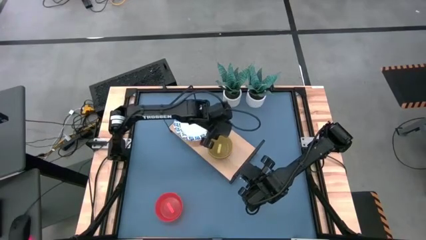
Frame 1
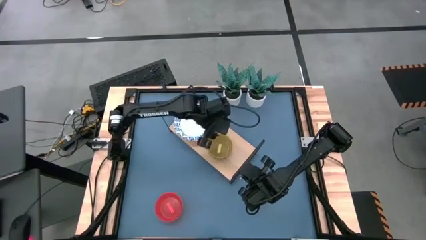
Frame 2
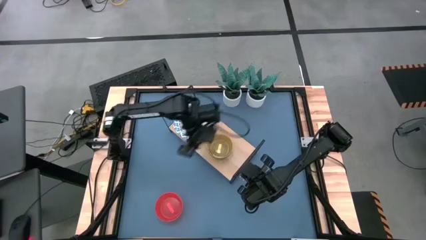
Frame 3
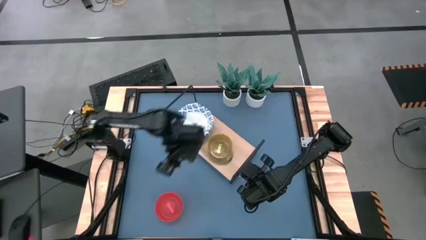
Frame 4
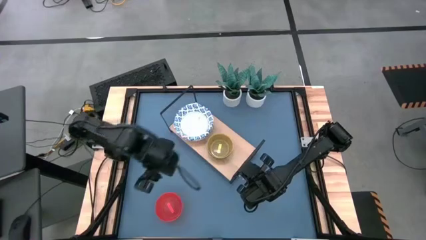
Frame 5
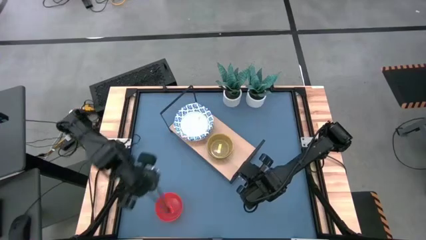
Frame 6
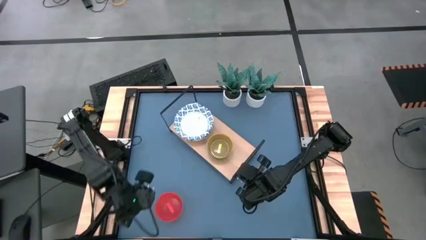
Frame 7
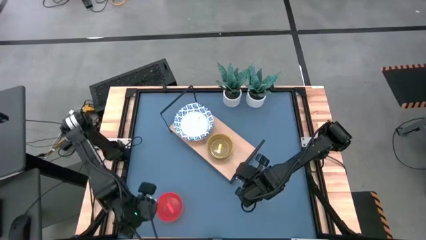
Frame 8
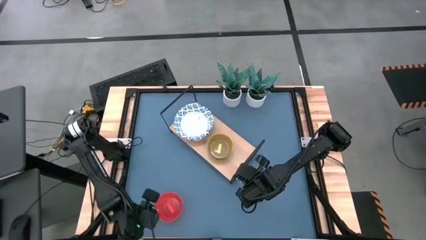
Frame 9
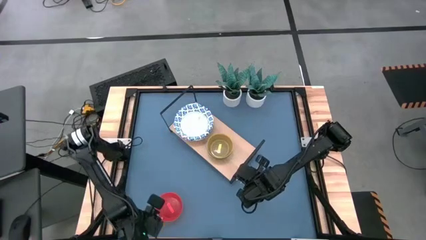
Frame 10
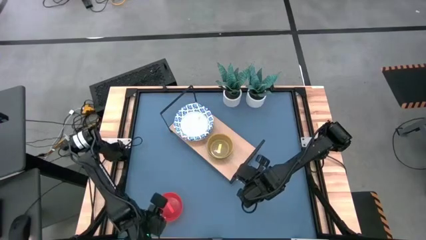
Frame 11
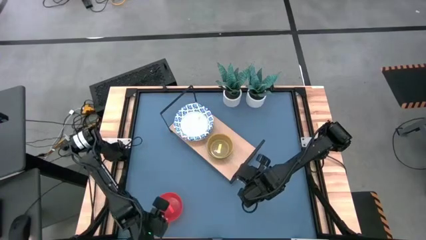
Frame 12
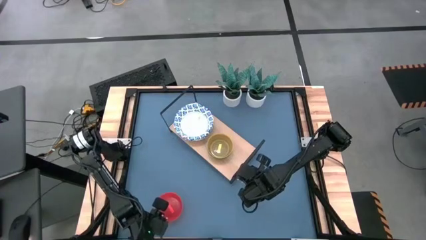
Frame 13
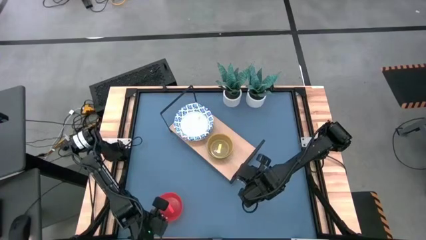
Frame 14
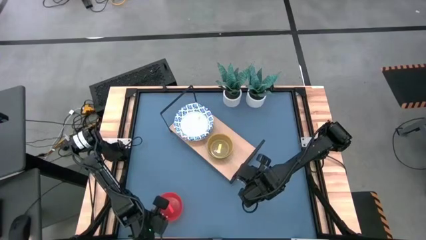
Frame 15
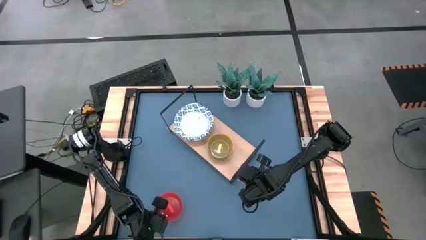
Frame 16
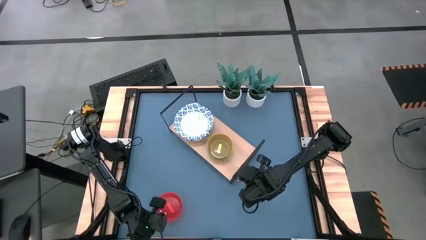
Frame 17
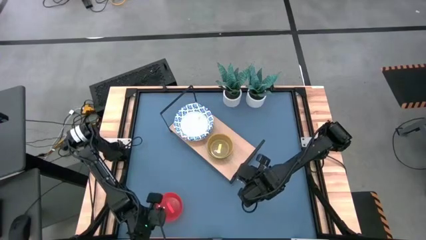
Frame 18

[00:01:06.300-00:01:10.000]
Task: Place and stack bowls onto a shelf
Stack the orange bowl on top of the yellow bowl on the shelf

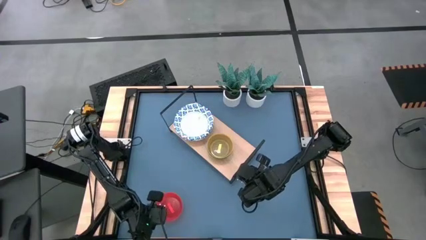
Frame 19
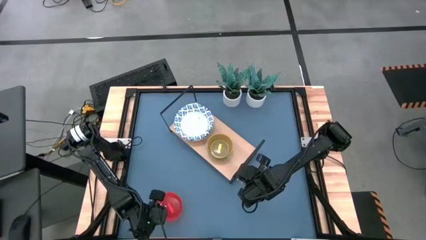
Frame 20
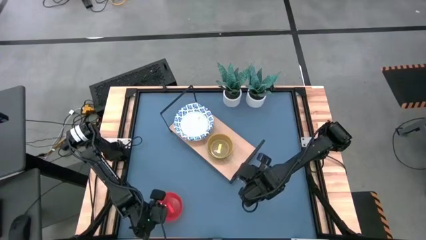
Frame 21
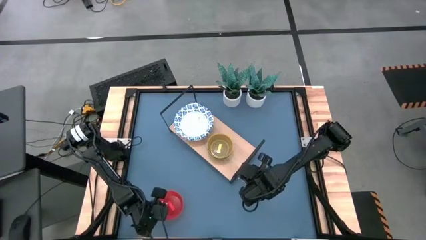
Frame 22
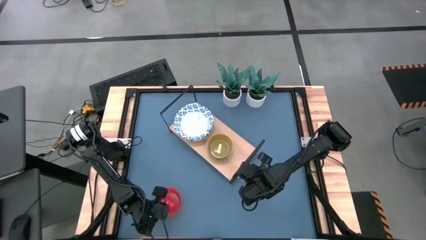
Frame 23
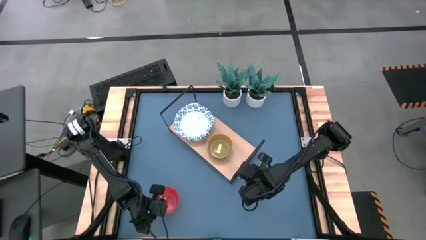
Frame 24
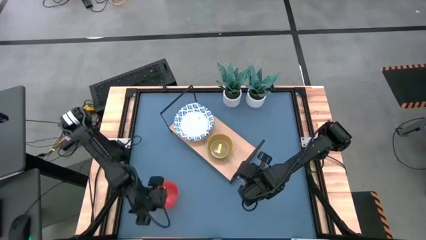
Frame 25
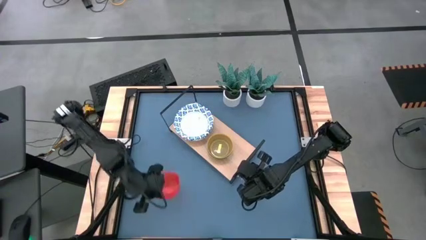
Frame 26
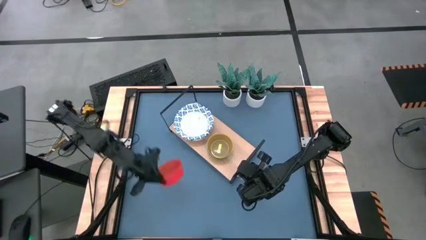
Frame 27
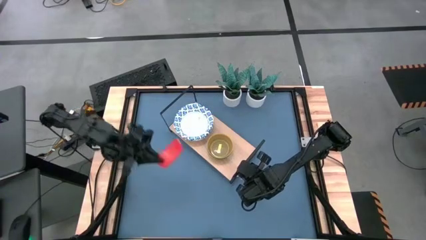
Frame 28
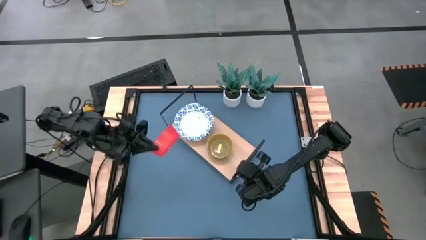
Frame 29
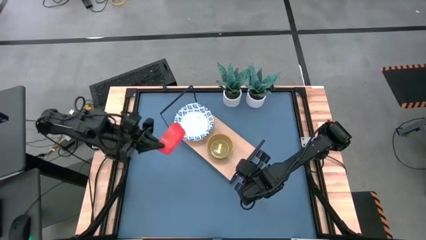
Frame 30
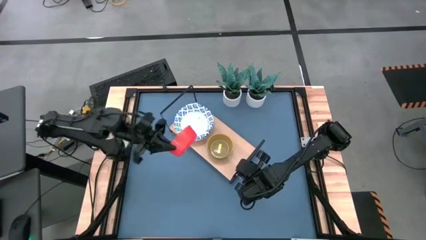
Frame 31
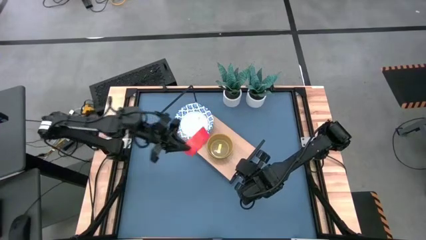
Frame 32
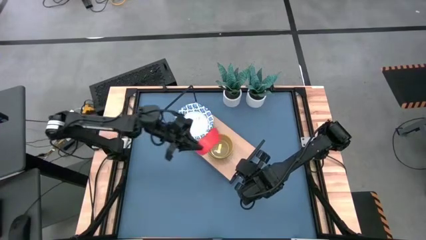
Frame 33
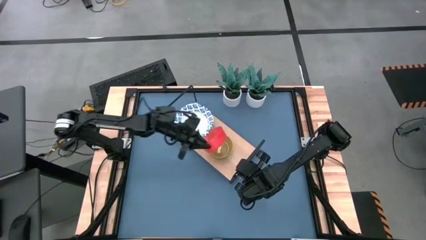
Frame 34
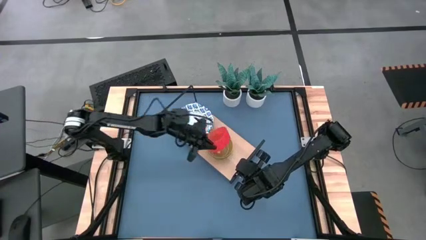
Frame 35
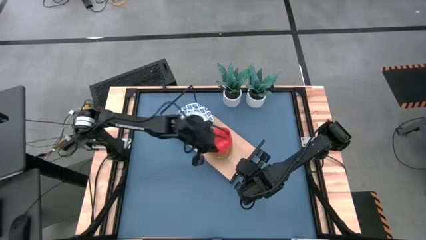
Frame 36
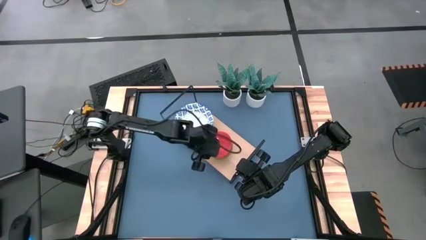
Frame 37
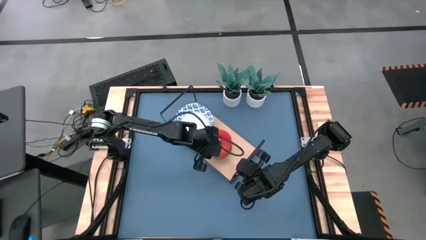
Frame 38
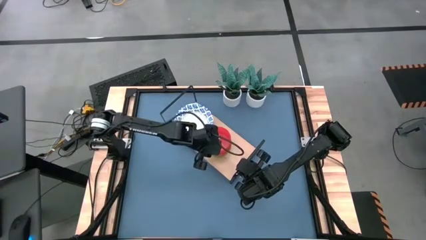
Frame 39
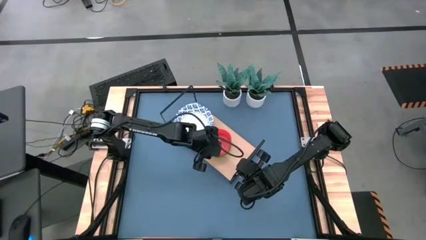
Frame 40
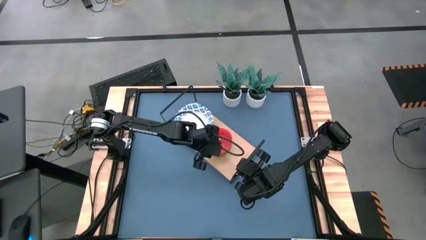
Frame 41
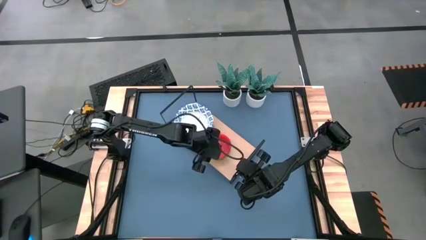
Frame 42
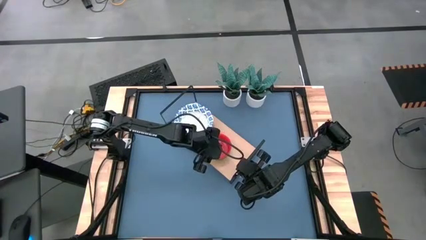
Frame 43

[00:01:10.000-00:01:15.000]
Stack the orange bowl on top of the yellow bowl on the shelf

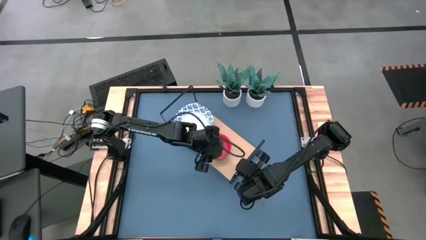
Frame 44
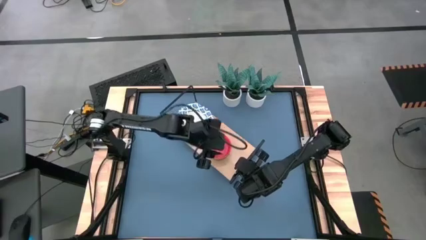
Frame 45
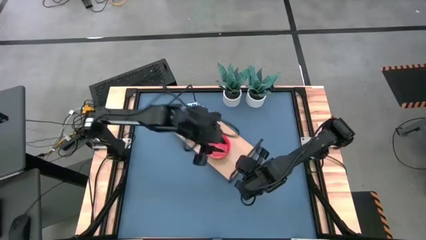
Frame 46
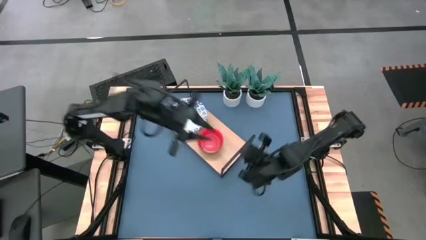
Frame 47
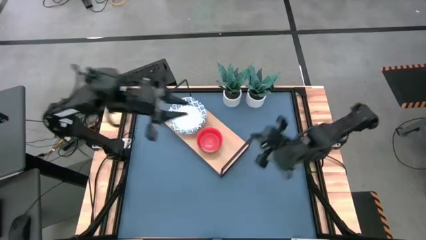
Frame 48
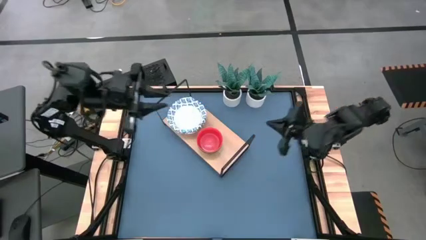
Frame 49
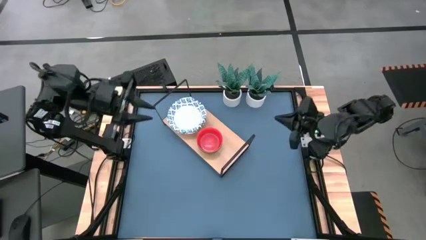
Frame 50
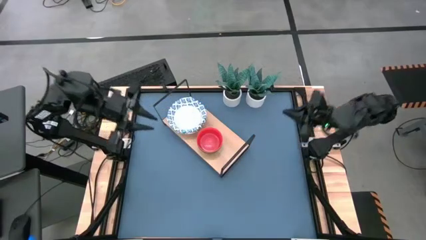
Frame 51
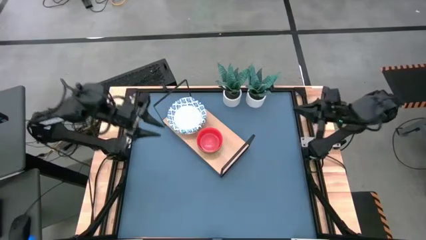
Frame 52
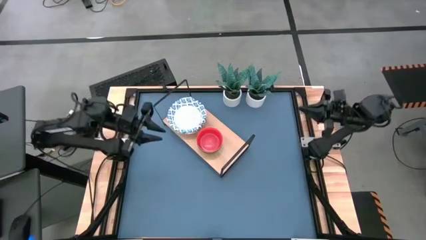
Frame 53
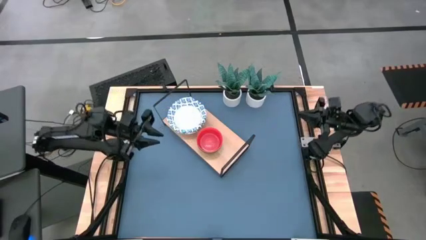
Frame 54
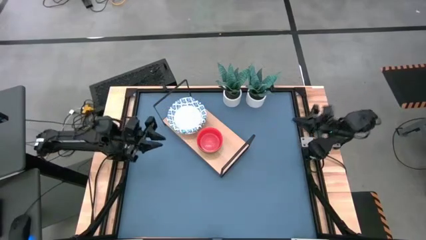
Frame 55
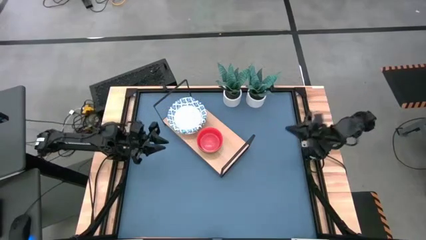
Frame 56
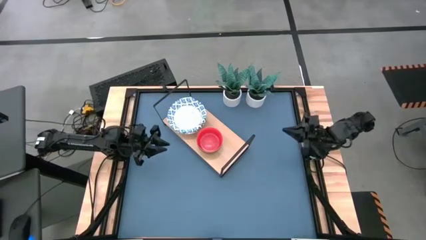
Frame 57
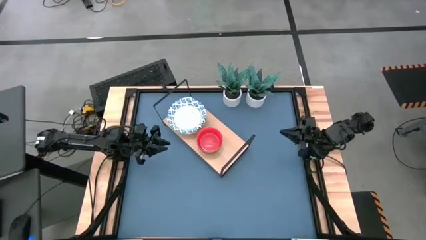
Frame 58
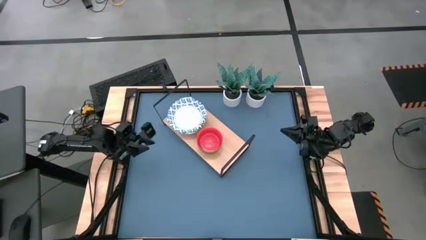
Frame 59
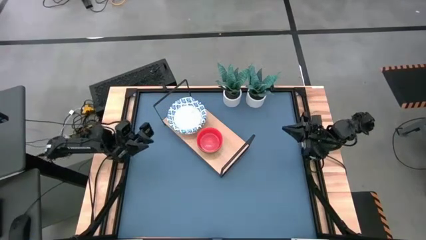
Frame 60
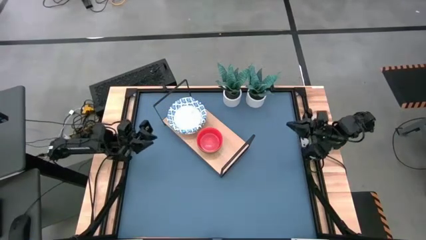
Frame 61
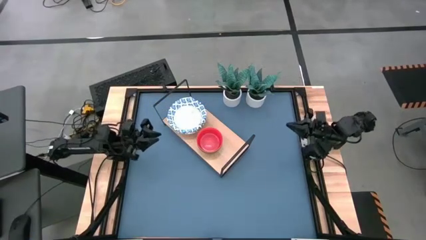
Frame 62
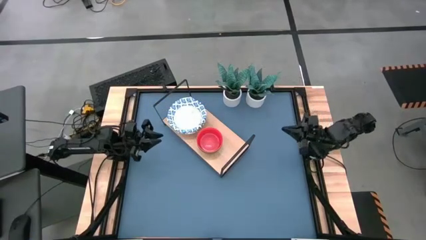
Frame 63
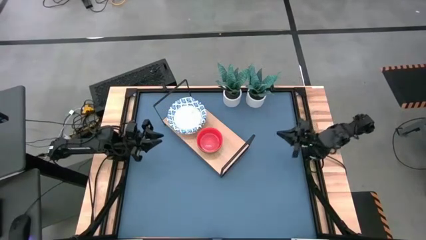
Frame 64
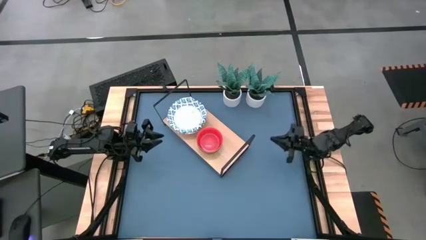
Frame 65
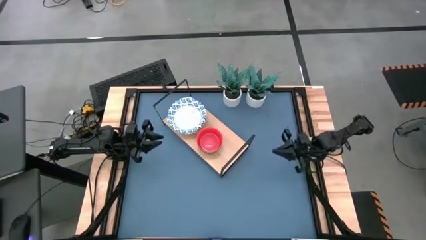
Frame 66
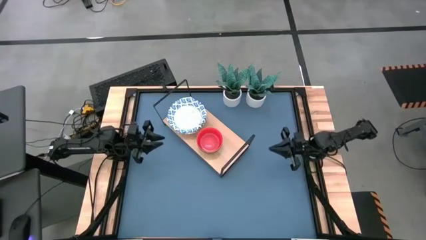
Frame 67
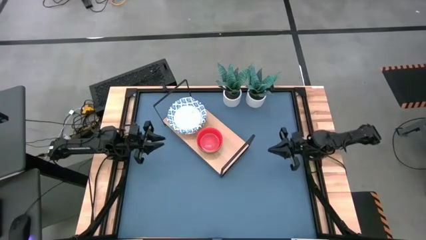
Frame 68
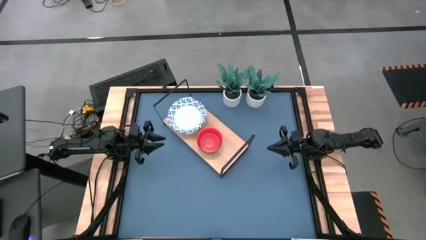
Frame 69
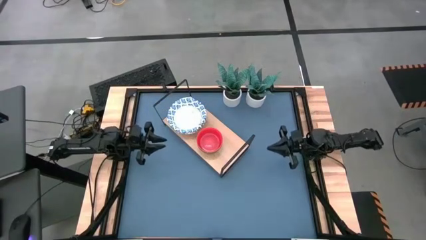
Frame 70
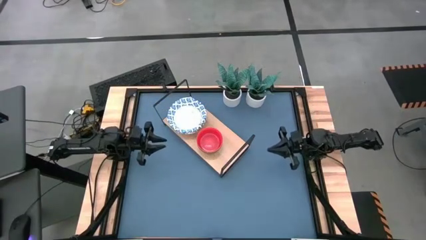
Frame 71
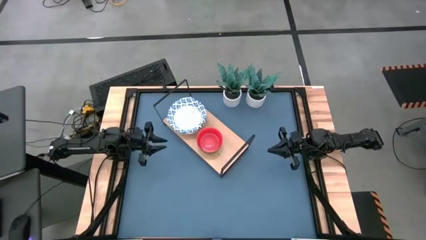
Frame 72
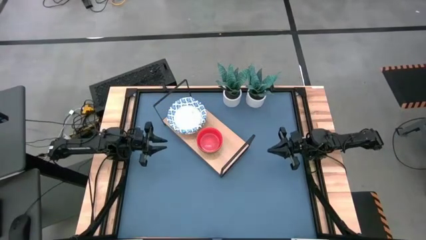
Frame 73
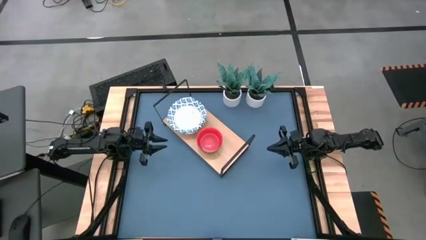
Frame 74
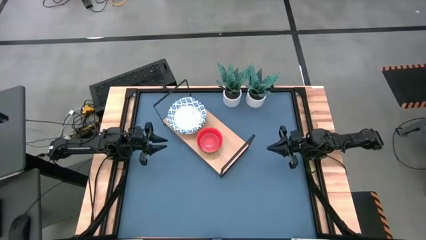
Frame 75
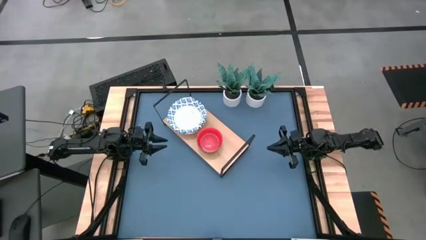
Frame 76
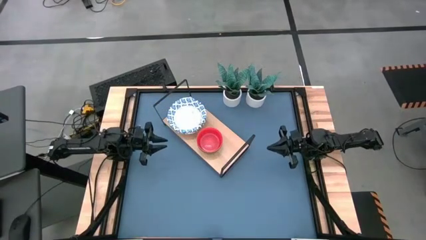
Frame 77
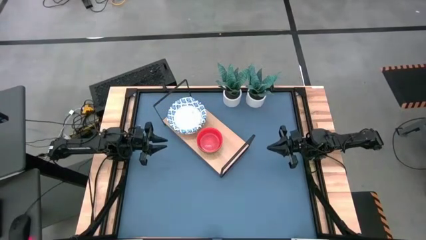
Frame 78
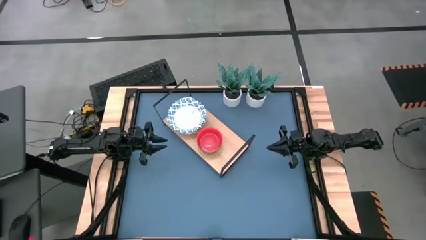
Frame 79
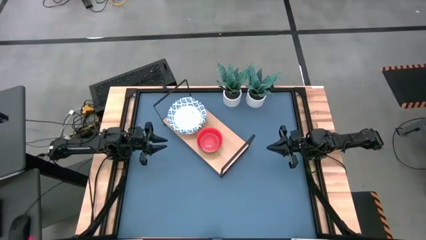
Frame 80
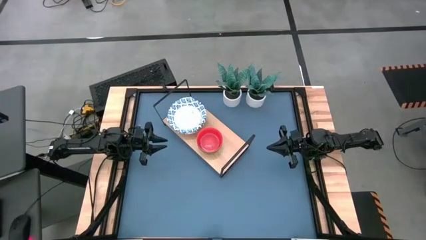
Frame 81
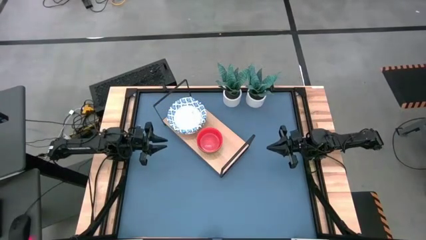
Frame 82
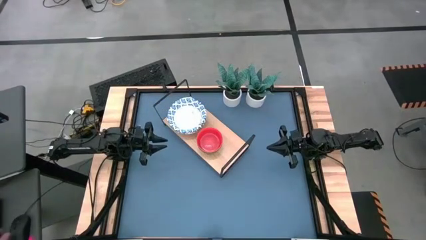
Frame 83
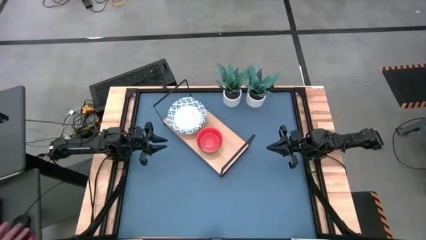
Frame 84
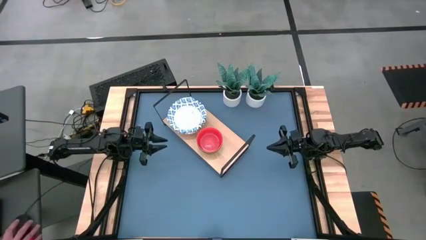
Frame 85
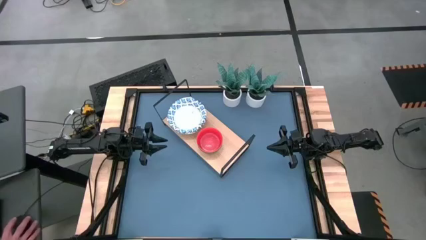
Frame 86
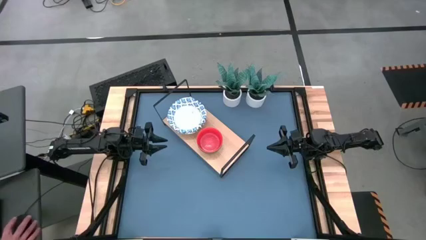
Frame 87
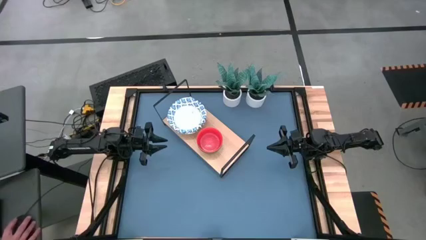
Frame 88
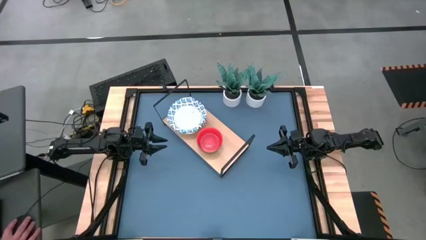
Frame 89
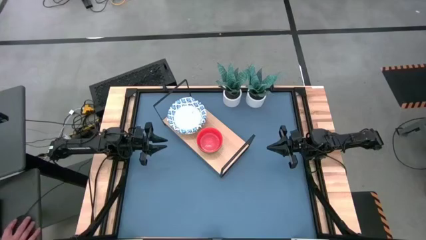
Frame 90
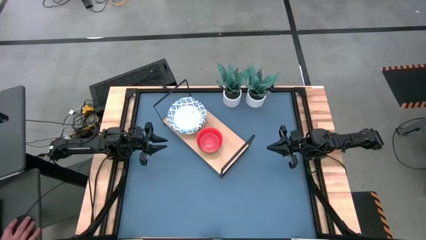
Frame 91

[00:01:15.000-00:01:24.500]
Return to Home Position
